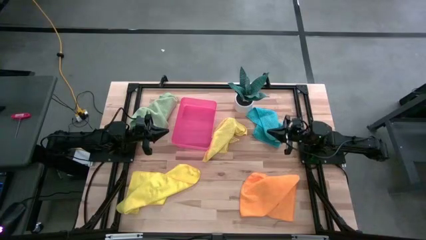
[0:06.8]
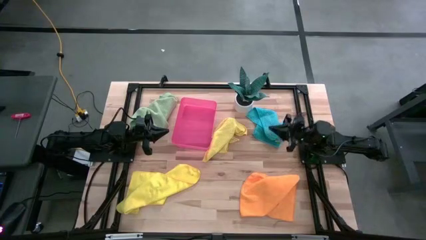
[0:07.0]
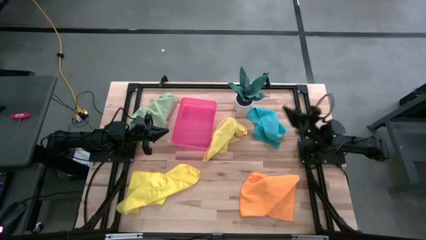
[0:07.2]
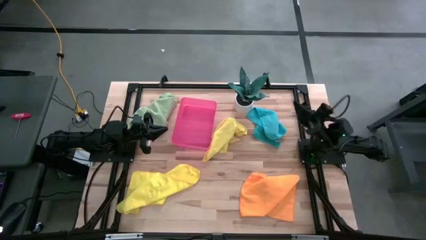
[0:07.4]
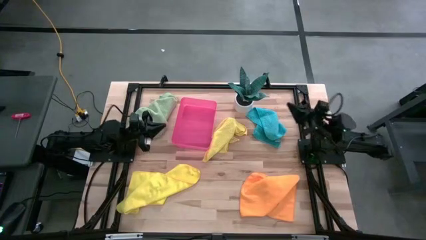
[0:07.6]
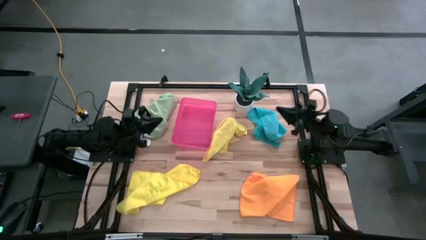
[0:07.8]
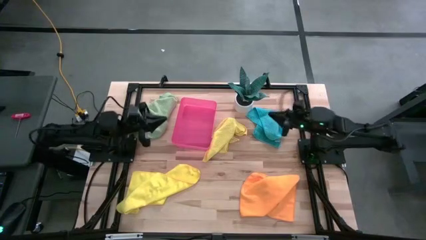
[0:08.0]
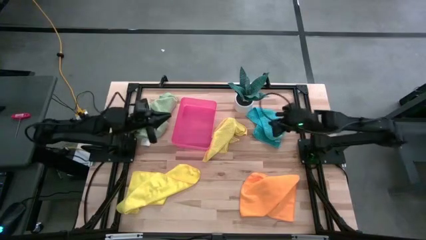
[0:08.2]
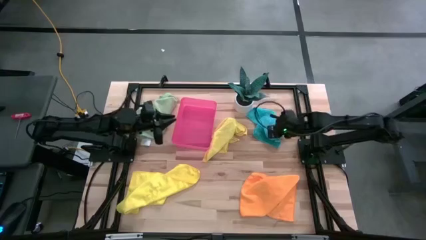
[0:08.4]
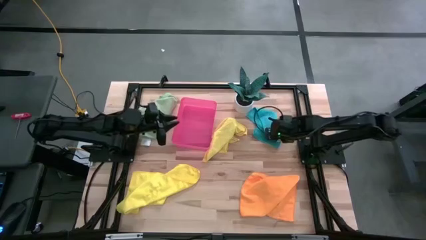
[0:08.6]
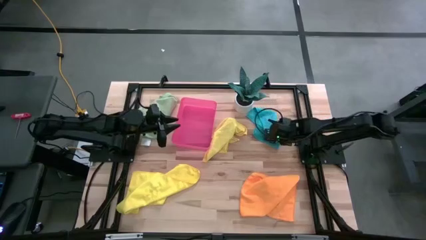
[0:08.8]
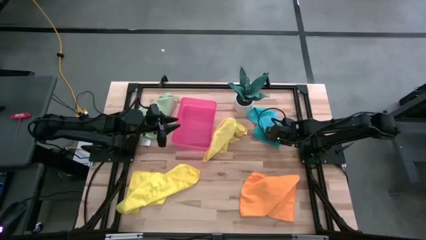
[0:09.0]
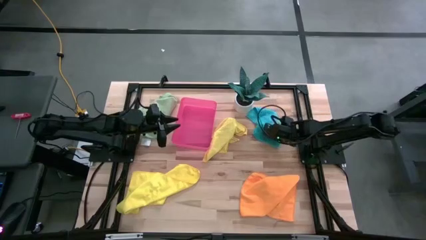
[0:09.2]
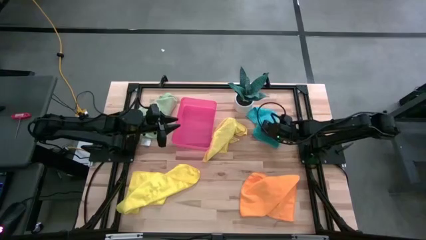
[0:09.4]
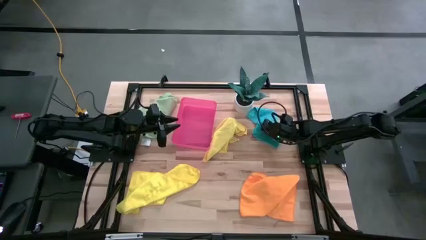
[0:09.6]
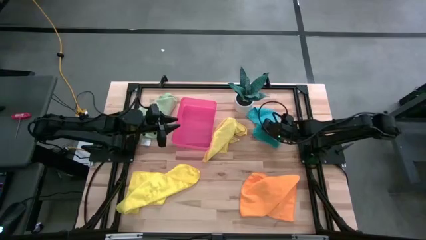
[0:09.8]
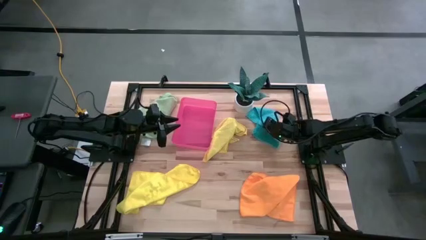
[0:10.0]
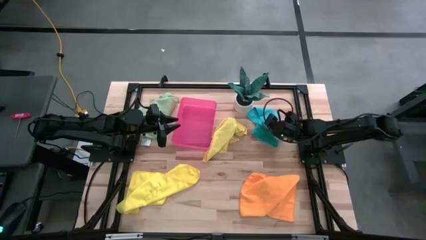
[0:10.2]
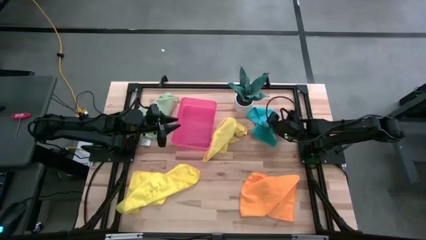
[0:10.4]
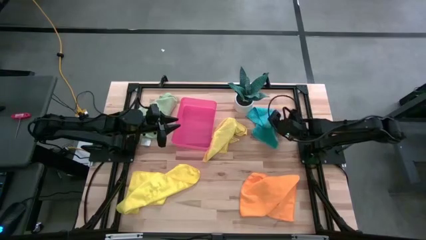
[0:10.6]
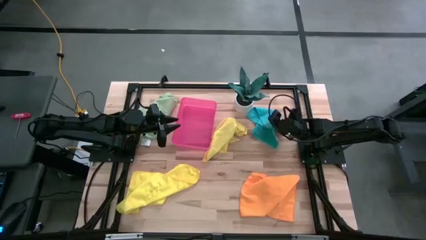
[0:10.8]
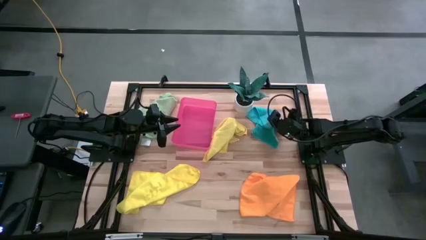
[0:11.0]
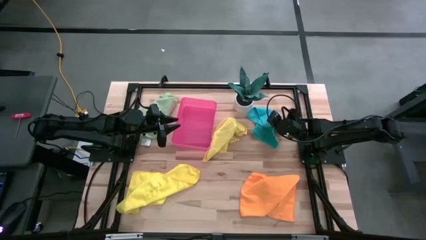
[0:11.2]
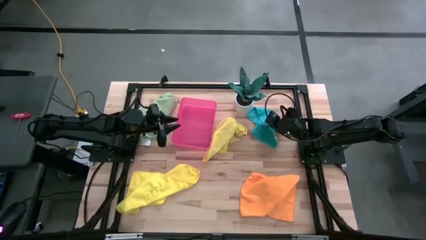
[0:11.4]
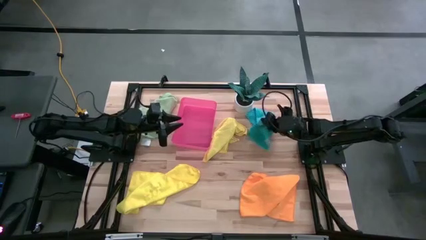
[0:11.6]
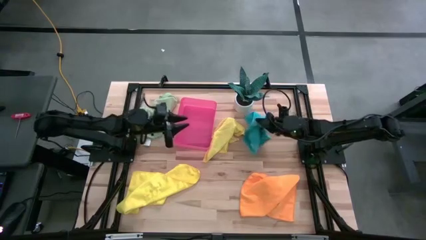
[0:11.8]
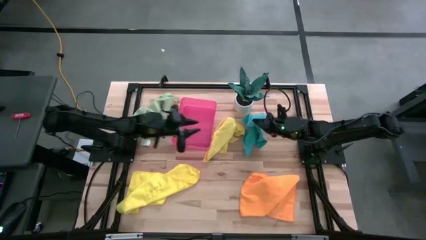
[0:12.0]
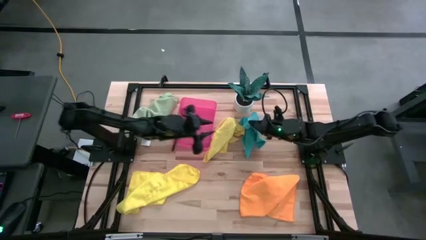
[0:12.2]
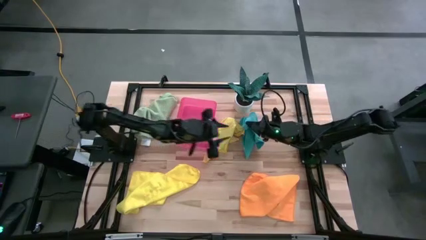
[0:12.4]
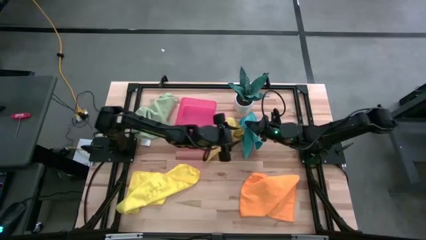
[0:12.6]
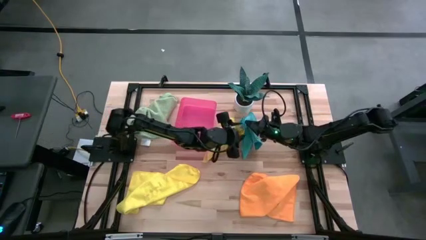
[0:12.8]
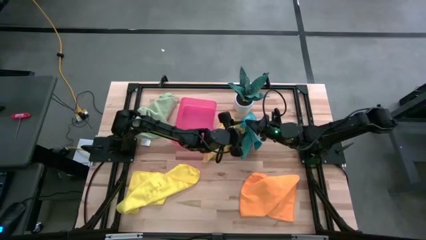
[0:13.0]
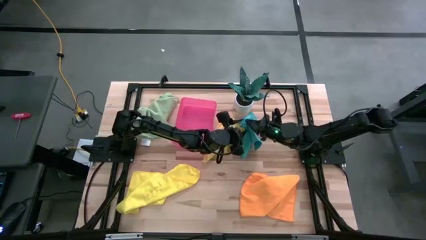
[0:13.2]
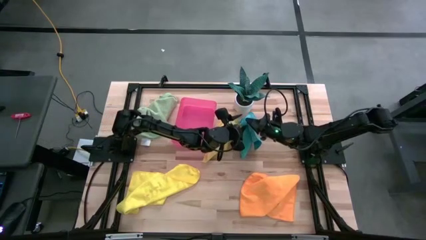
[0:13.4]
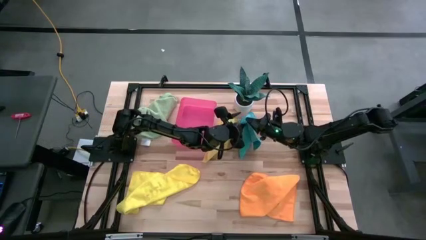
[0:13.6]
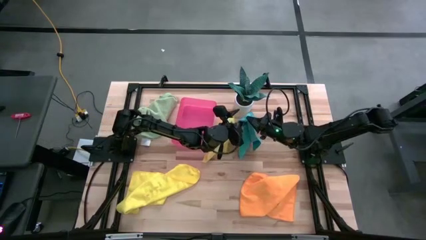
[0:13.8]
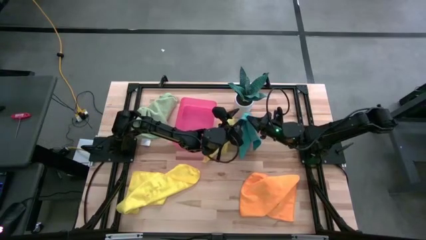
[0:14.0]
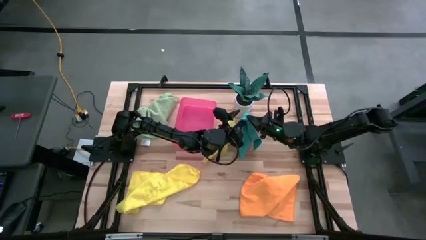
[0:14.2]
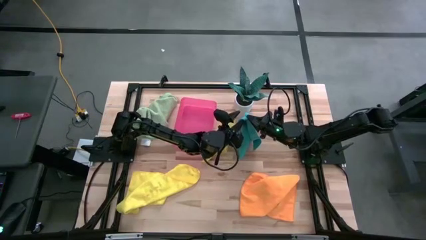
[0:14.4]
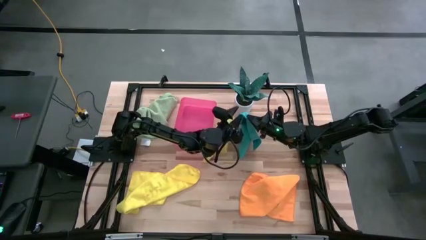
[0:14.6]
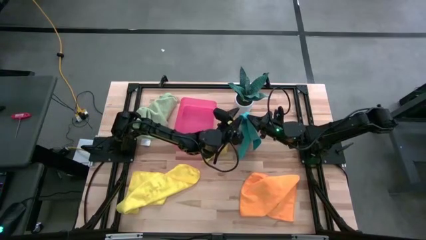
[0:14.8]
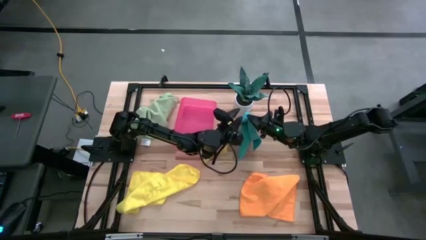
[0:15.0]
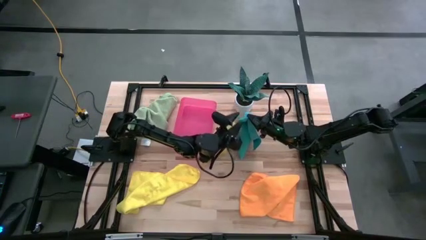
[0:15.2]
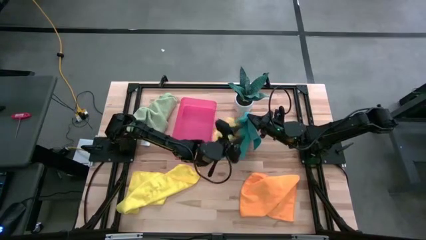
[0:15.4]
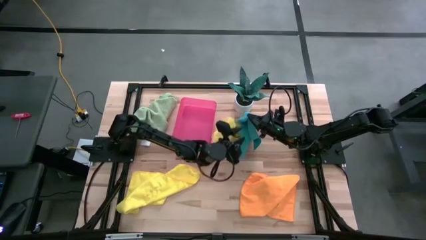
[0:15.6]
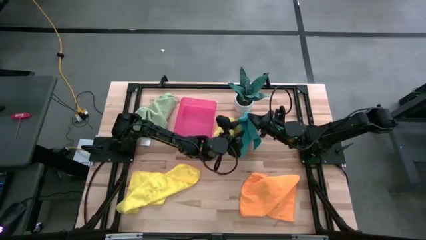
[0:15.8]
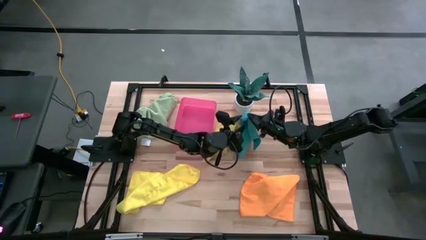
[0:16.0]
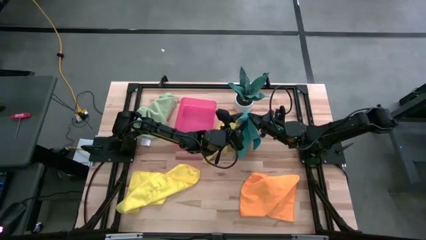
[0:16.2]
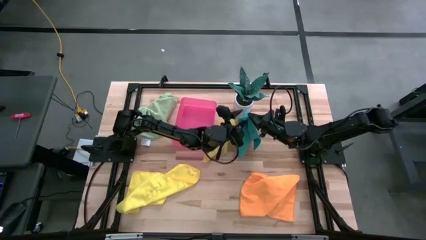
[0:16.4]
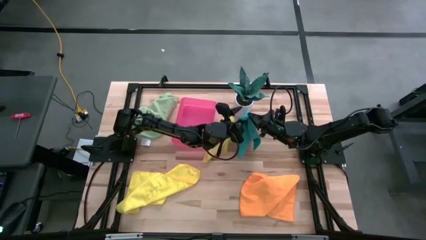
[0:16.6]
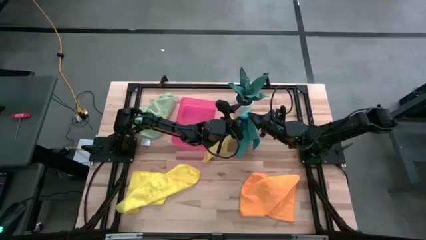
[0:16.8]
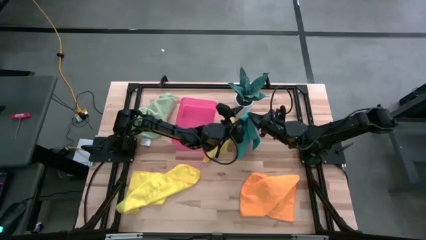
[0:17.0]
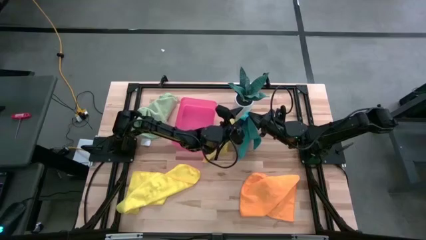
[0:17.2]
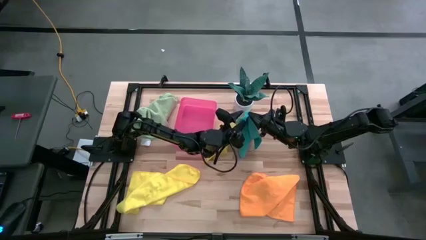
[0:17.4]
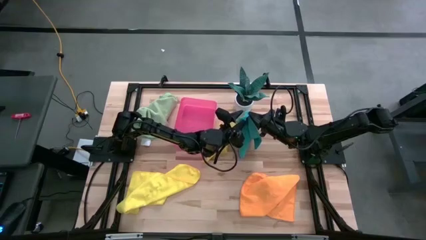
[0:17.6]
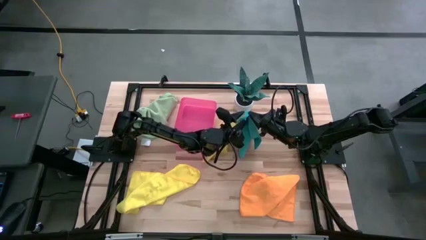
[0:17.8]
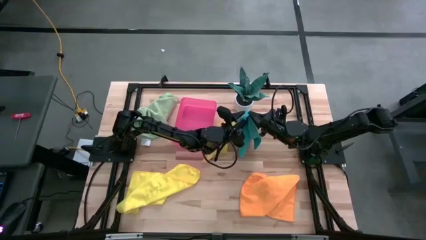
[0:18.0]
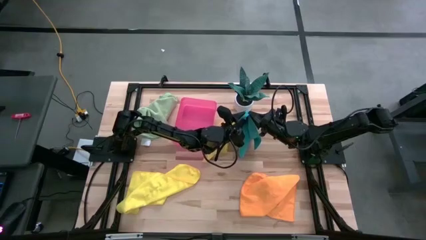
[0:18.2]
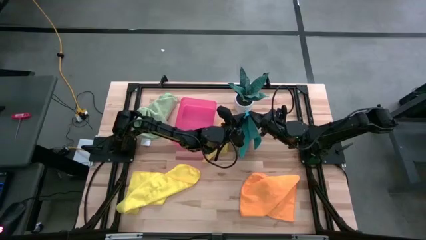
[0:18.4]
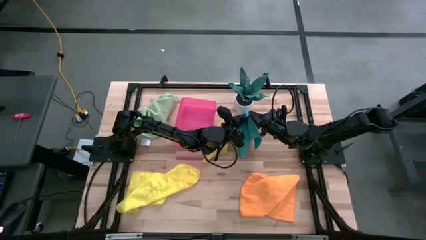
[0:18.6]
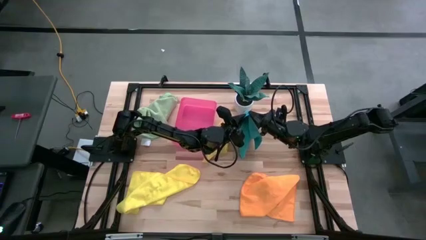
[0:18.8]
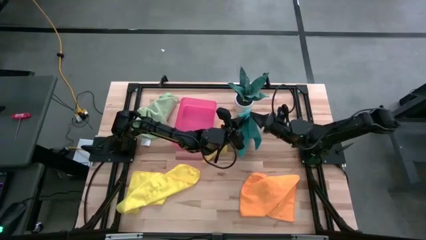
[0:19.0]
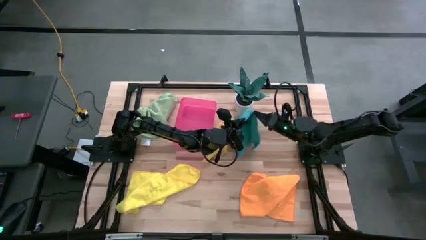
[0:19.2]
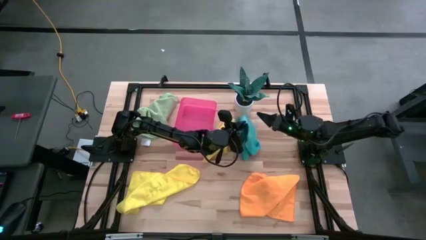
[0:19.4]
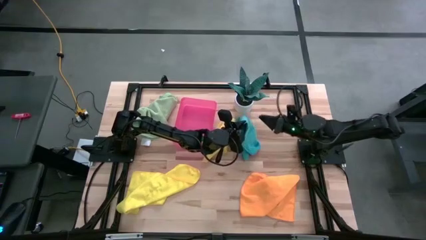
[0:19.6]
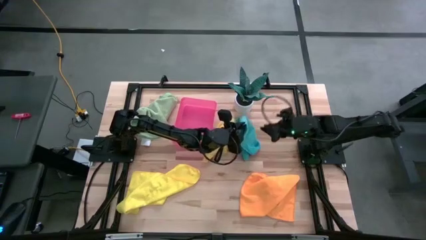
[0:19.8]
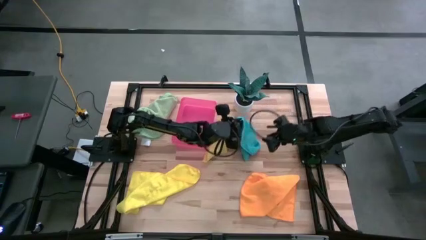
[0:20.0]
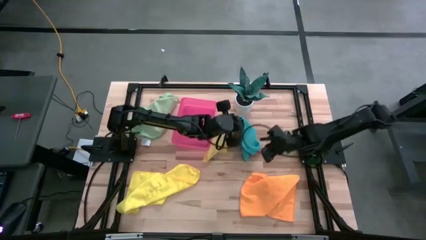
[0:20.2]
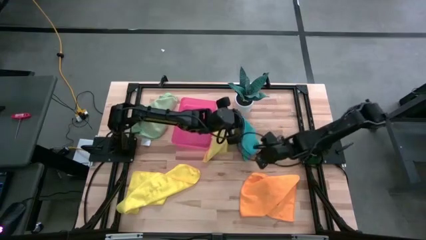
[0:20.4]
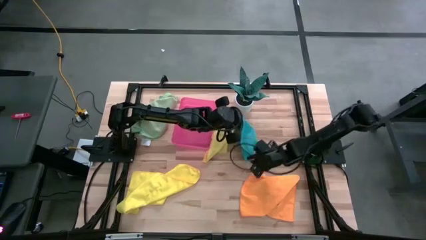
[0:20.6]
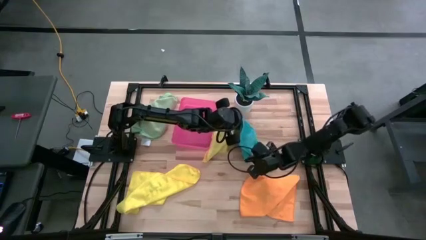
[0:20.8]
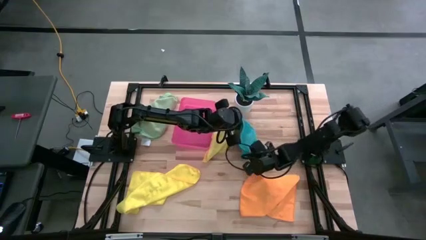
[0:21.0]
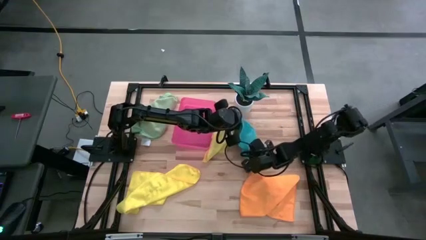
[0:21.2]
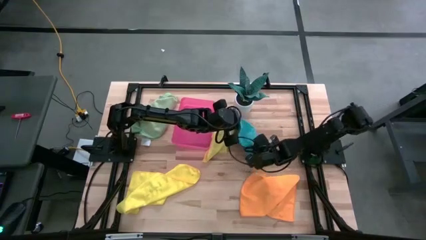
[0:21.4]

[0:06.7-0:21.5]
Task: Fold microfiber towels
Fold the blue microfiber cloth

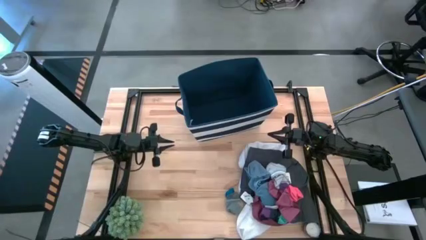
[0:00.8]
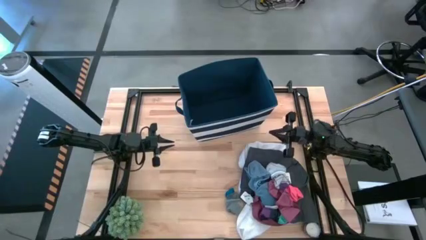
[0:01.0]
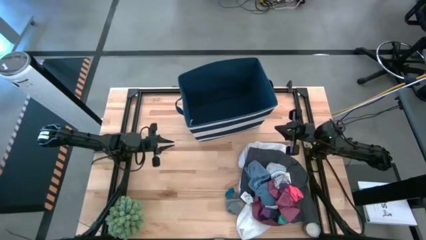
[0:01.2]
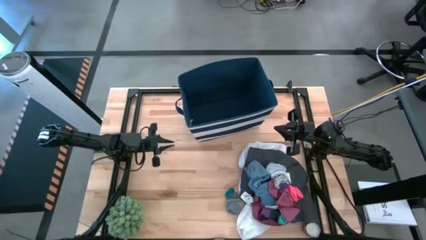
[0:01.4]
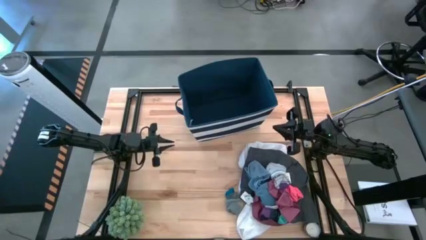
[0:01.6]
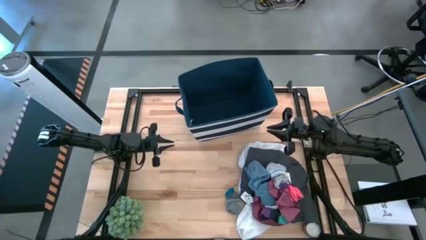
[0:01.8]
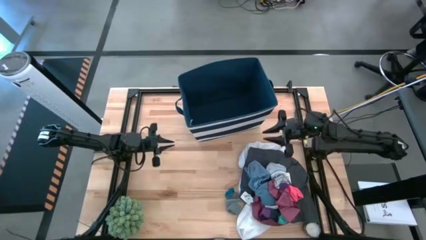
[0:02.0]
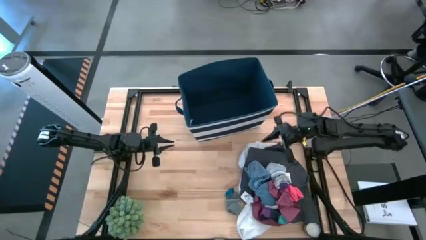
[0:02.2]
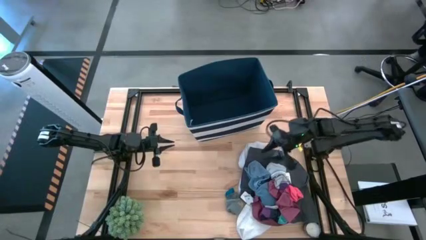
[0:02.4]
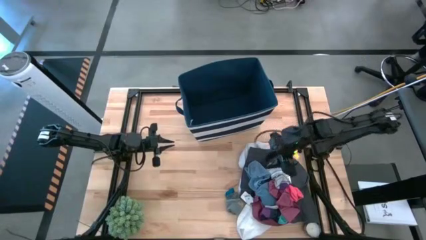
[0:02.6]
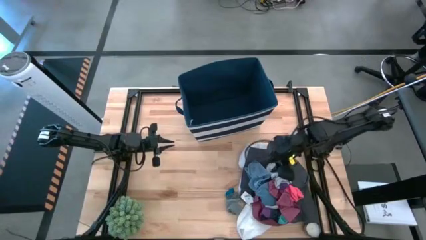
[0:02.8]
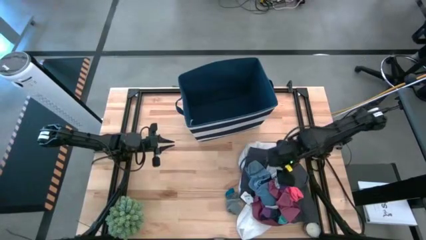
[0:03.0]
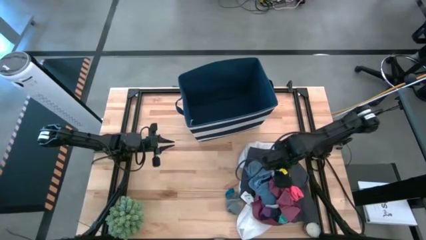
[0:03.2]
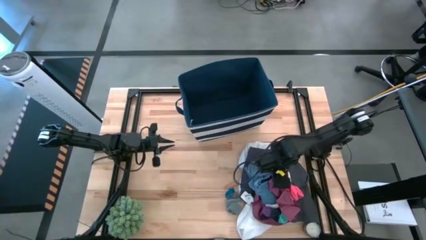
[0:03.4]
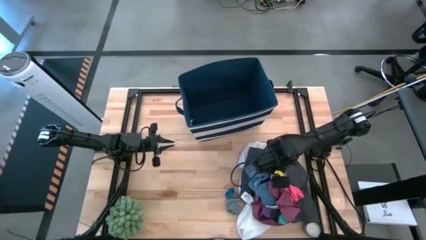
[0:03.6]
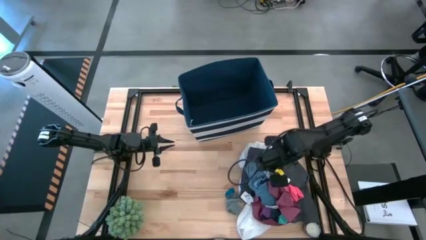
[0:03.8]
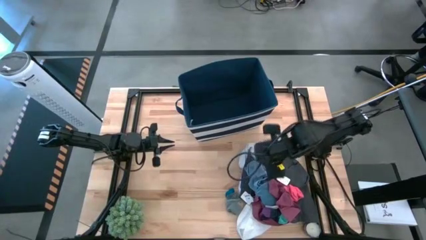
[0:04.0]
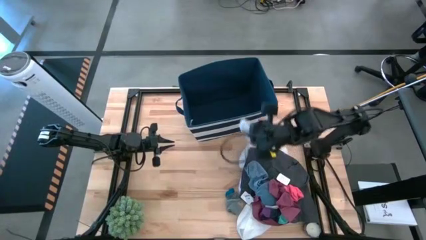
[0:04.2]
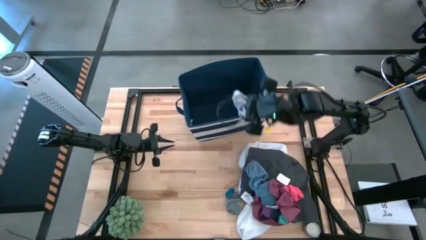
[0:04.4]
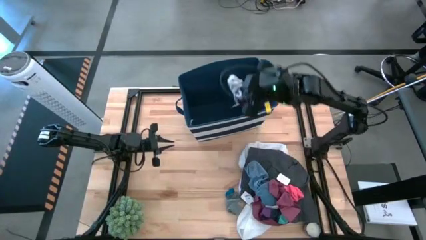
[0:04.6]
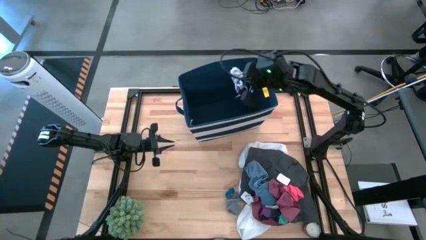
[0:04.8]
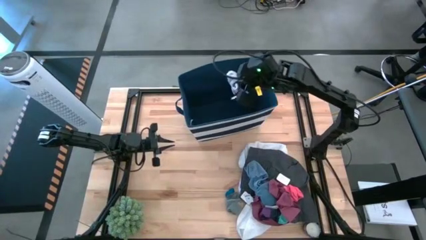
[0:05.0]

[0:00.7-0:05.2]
Task: Sort clothes
Put the gray socks with multi-colored stripes into the laundry bin
